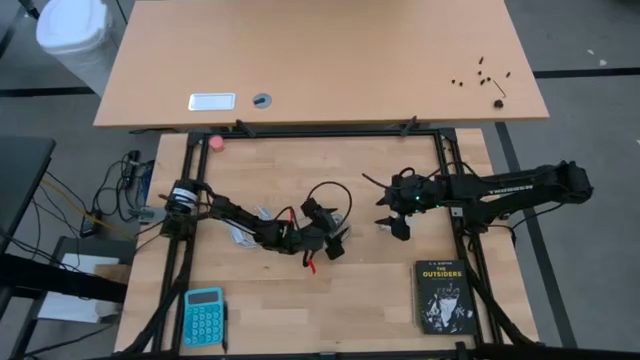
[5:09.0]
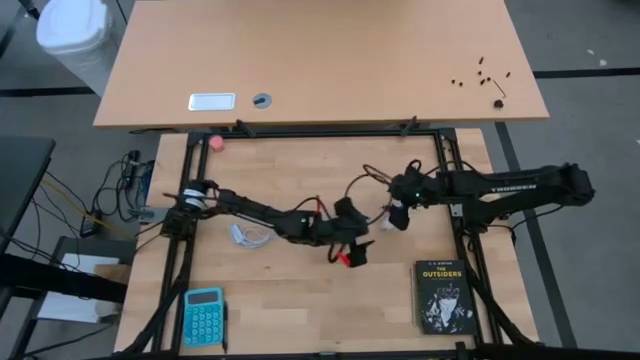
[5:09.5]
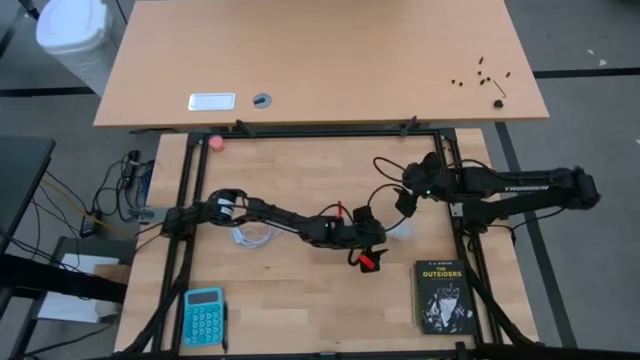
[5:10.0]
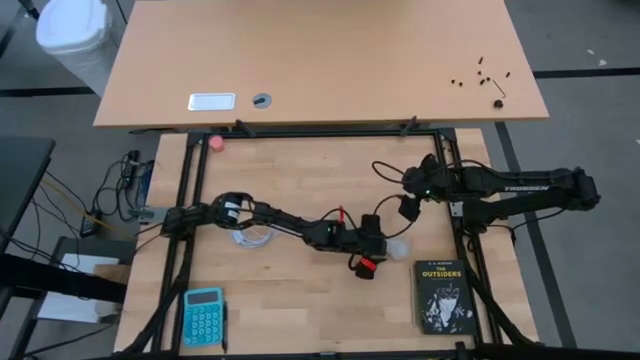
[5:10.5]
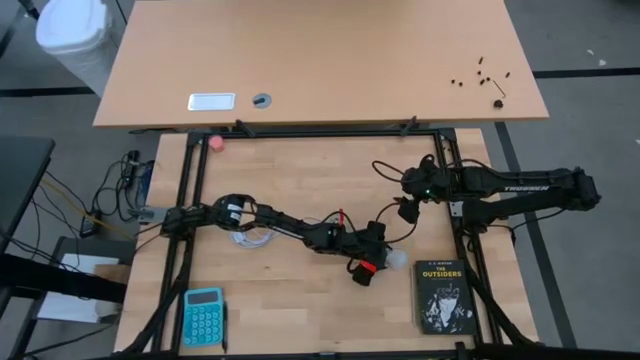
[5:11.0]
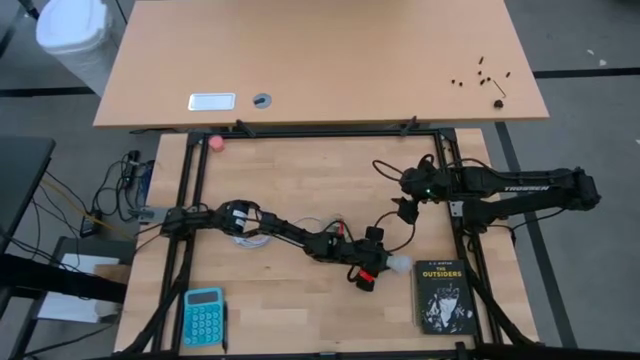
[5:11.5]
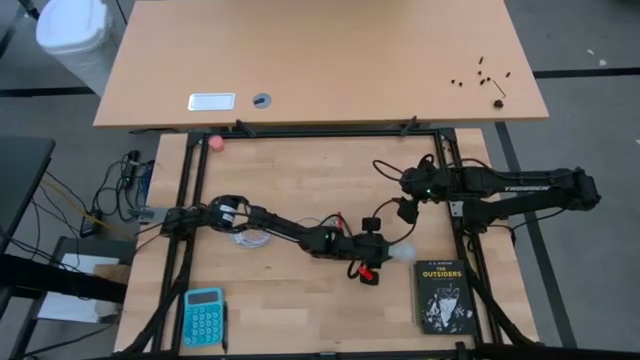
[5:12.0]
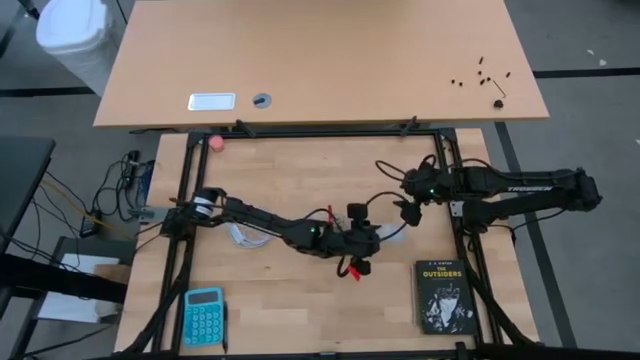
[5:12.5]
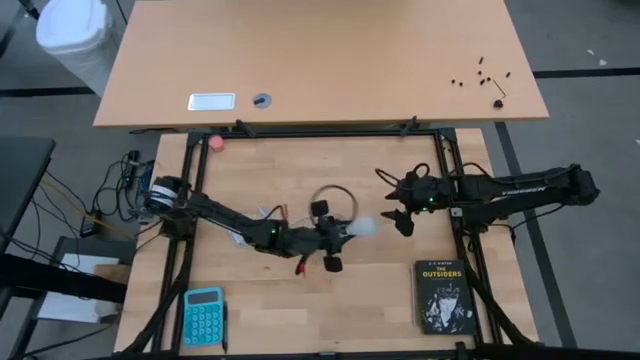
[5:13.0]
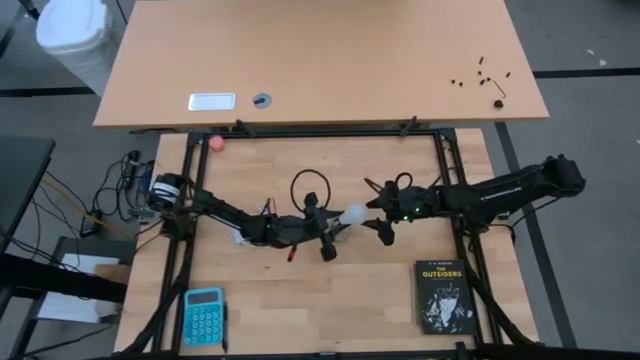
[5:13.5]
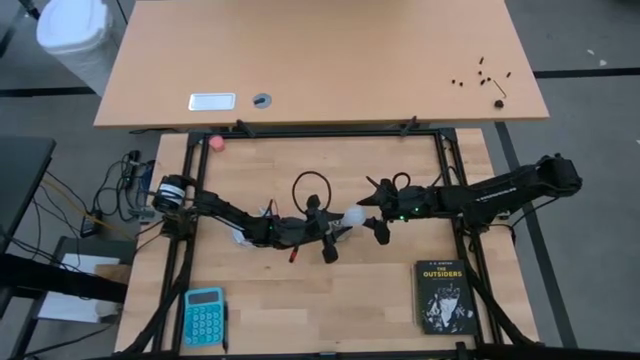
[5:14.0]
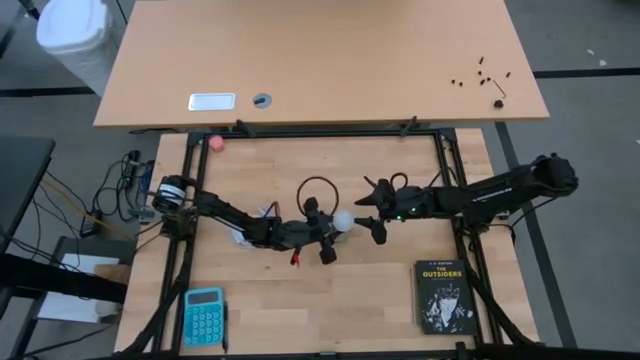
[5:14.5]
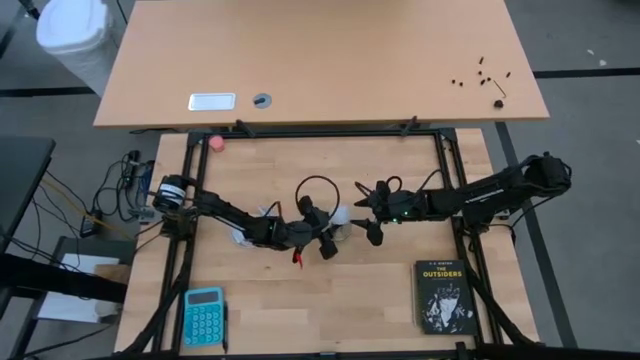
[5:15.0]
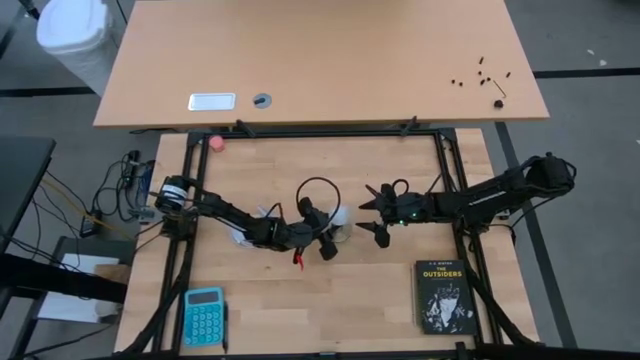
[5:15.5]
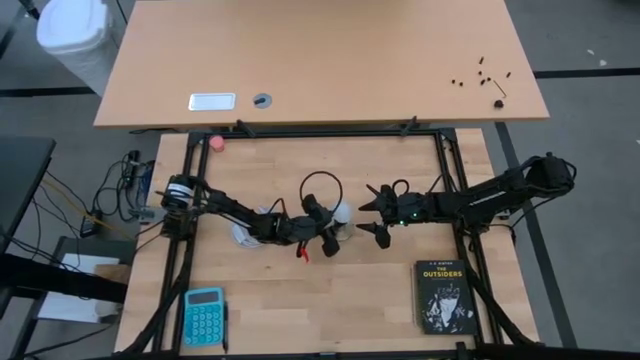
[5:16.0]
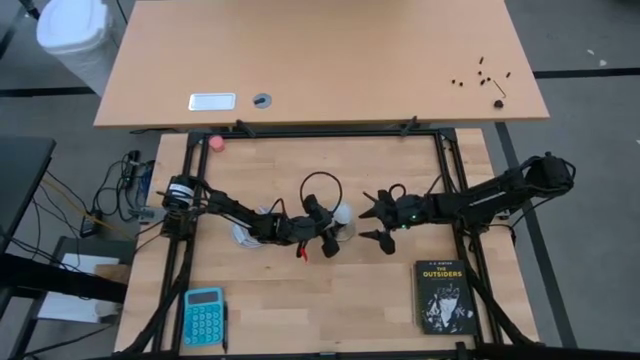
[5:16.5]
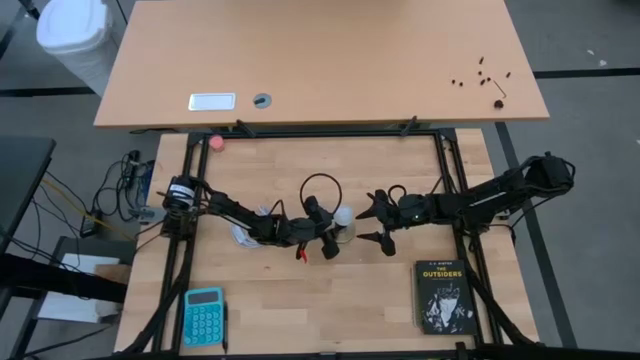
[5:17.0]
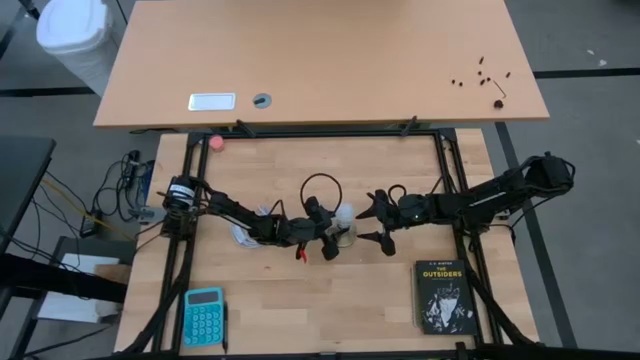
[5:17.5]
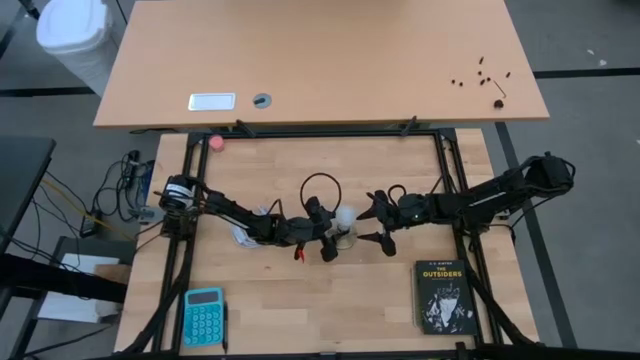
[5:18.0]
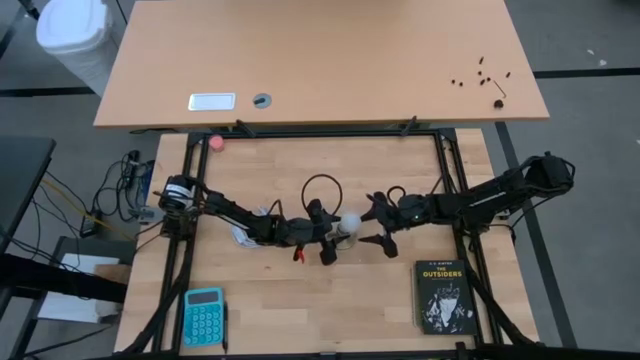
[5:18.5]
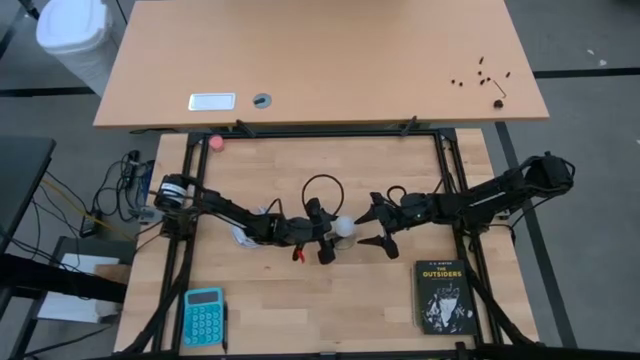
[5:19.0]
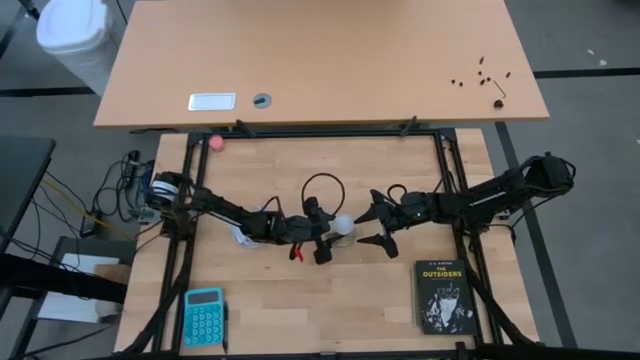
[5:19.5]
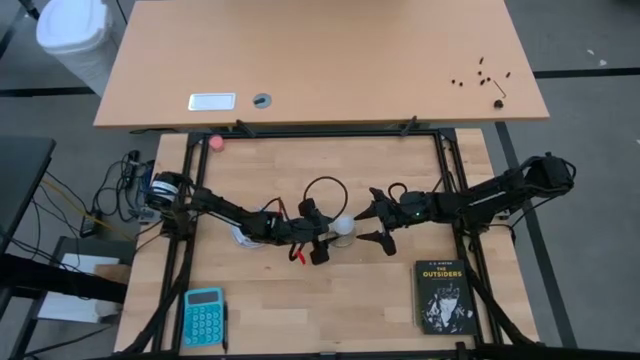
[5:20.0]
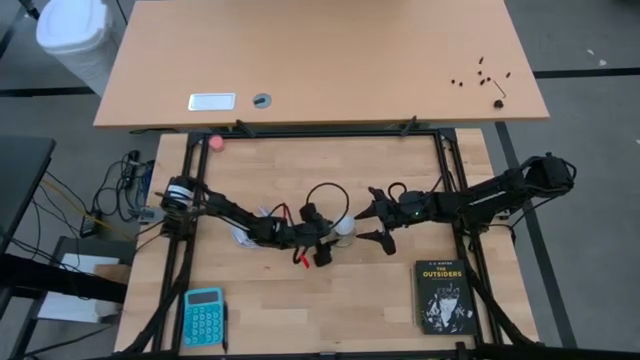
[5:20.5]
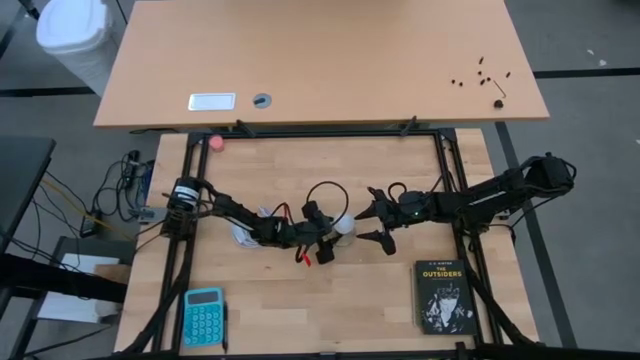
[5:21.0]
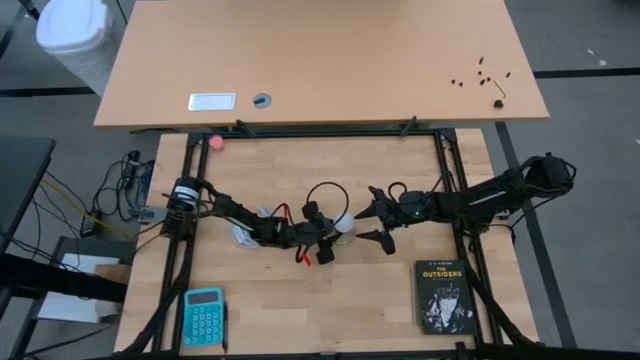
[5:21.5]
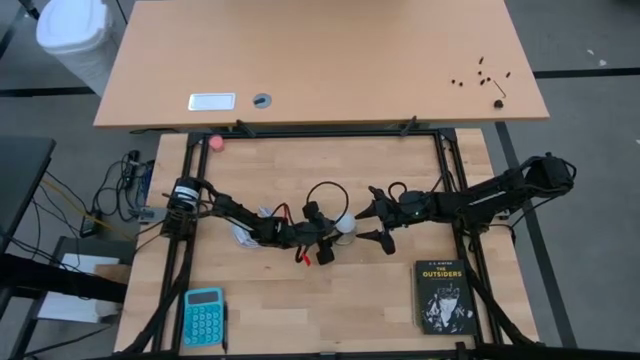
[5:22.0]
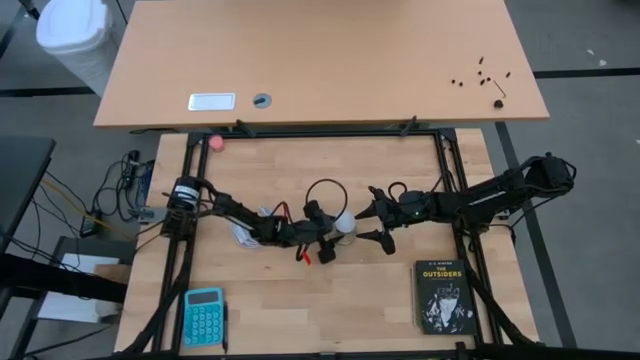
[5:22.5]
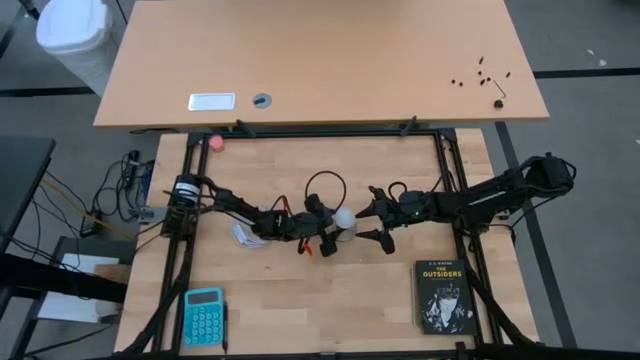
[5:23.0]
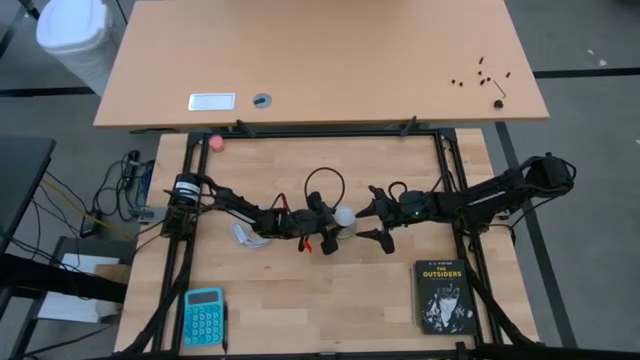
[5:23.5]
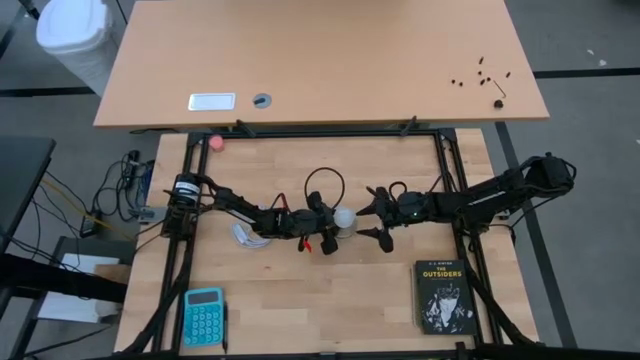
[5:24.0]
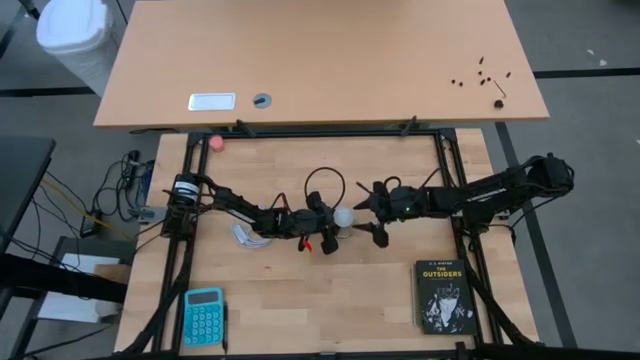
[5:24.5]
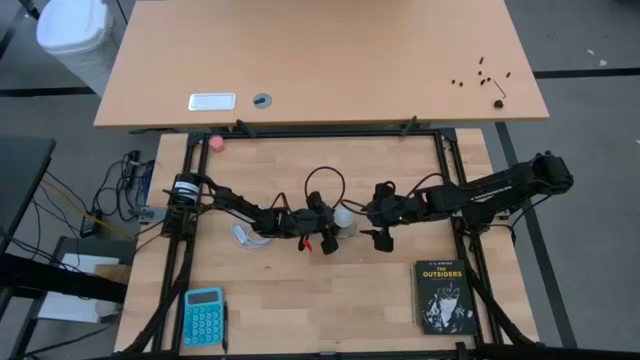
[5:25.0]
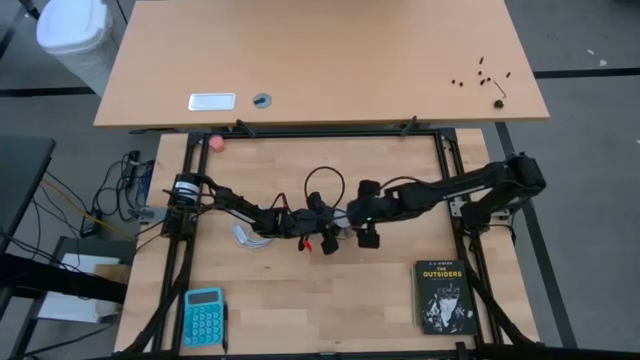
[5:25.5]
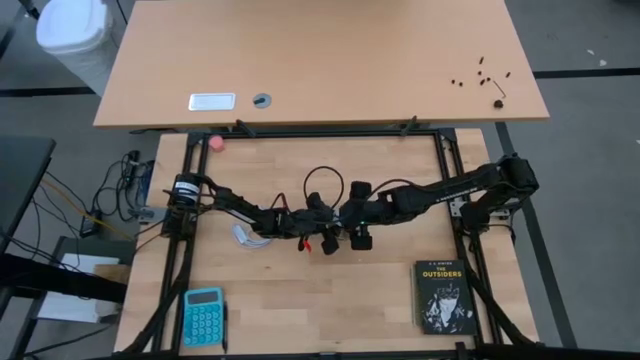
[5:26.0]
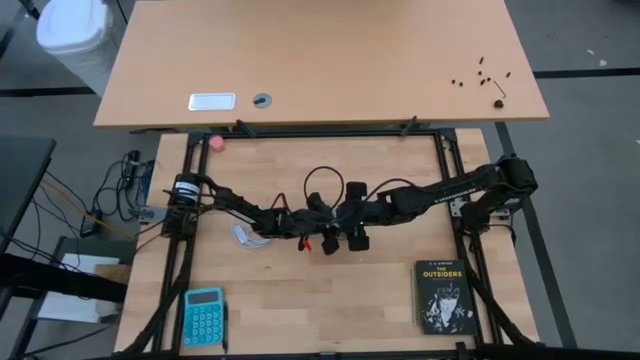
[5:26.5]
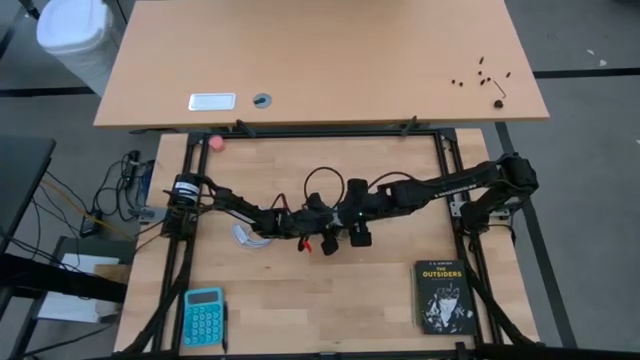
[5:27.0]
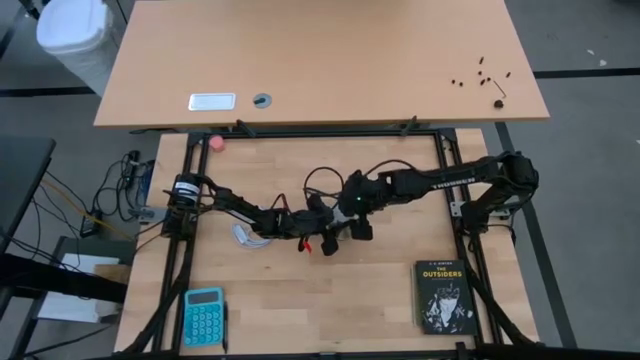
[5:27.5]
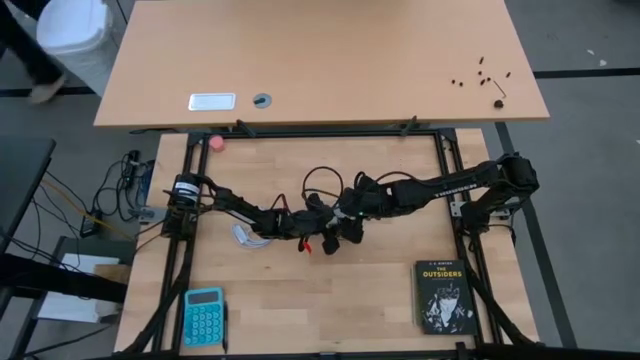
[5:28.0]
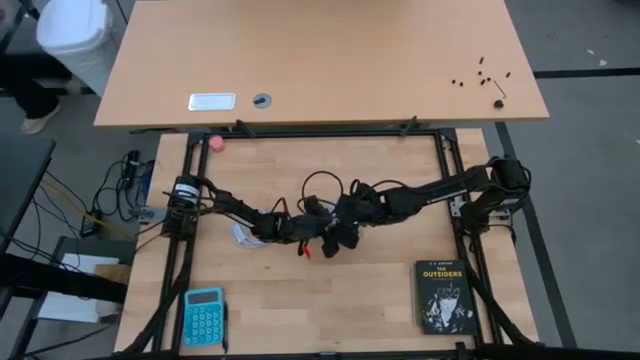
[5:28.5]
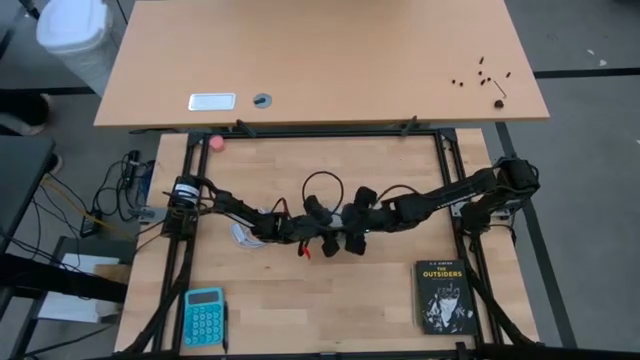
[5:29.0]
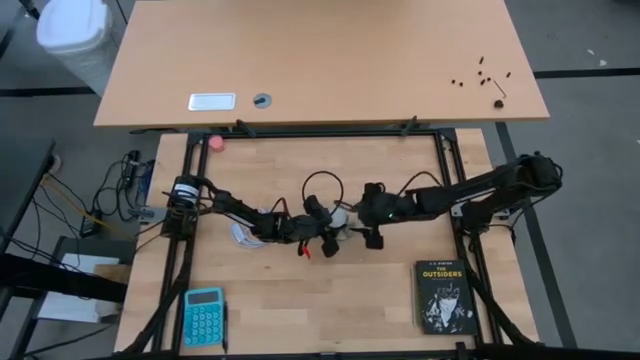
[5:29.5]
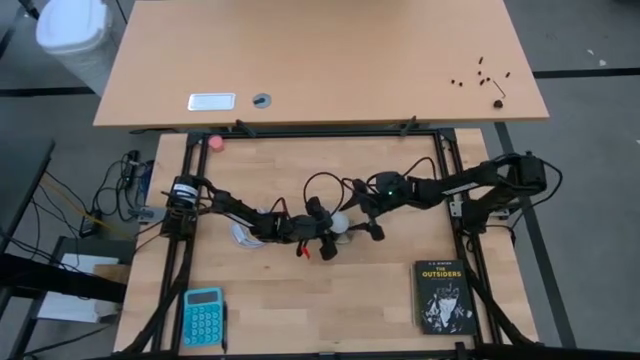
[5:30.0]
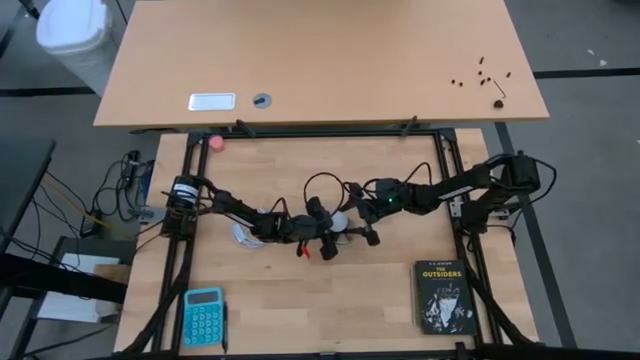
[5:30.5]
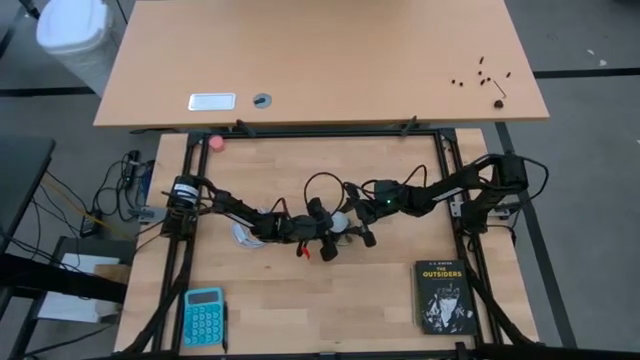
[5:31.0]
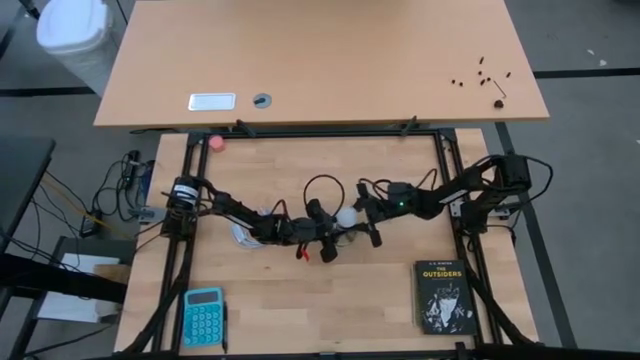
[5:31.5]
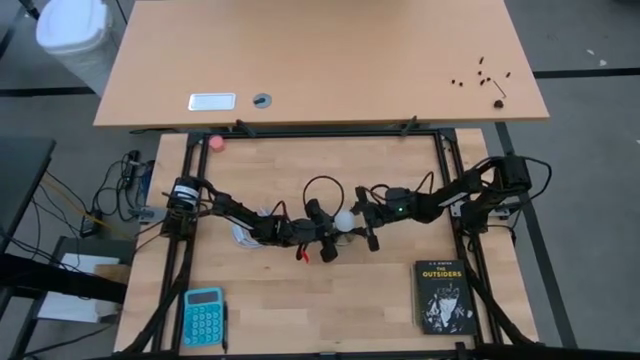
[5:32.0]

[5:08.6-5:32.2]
Task: Screw lightbulb
Insert the white lightbulb into the silver lamp
